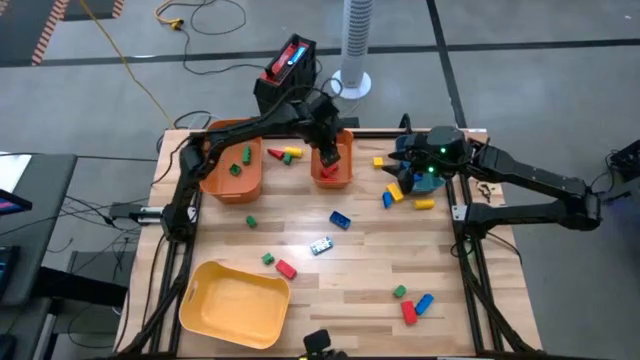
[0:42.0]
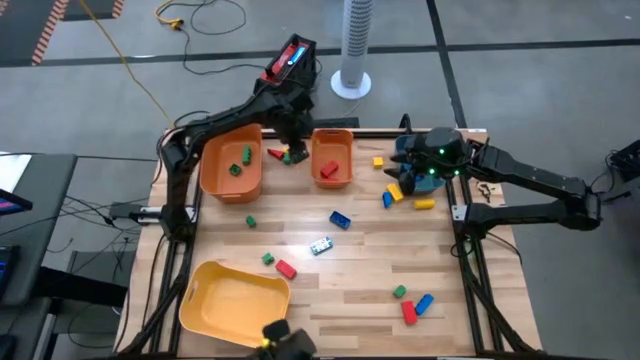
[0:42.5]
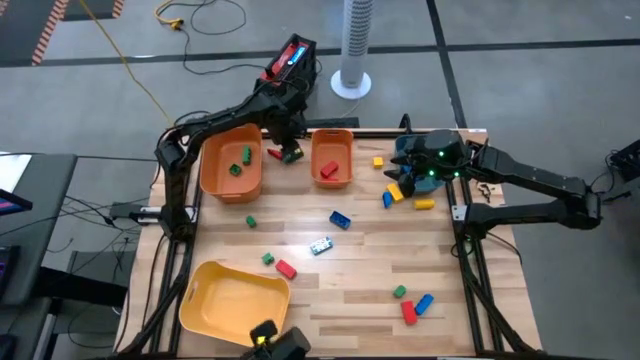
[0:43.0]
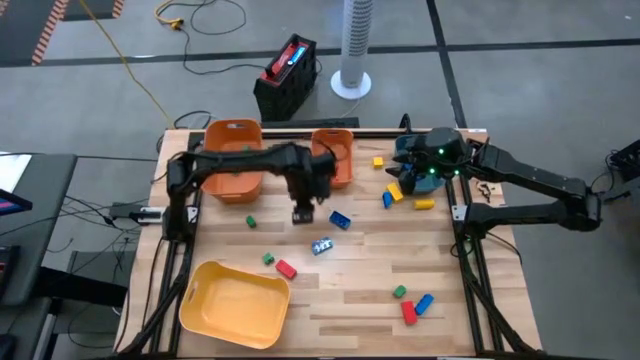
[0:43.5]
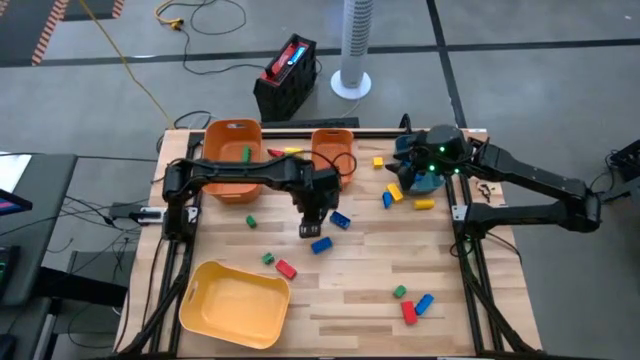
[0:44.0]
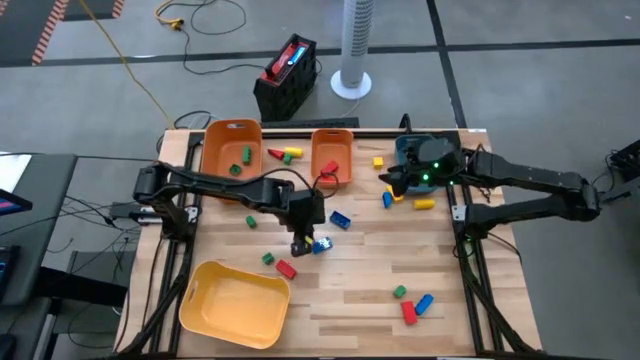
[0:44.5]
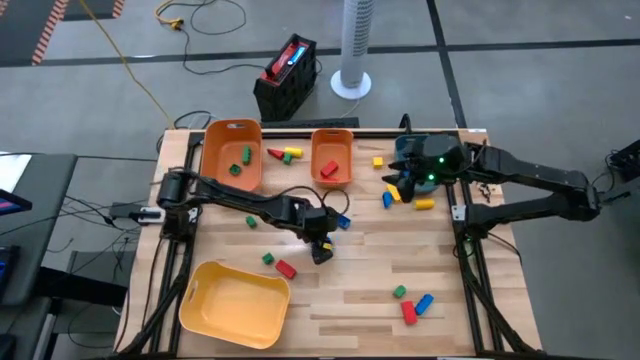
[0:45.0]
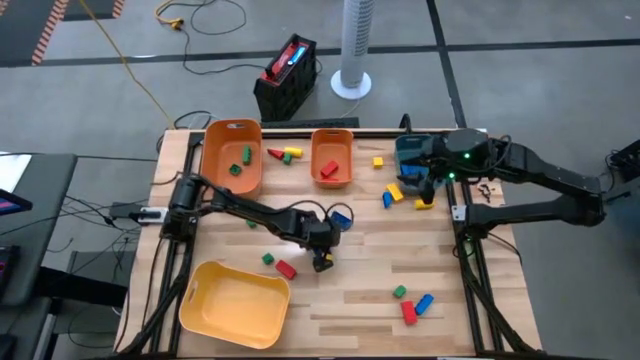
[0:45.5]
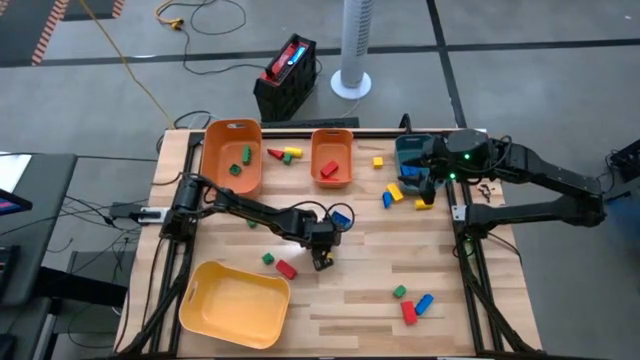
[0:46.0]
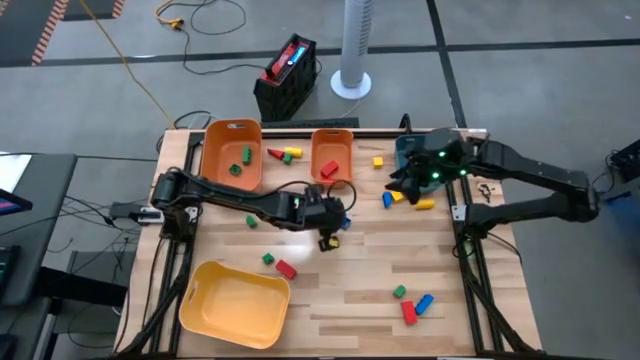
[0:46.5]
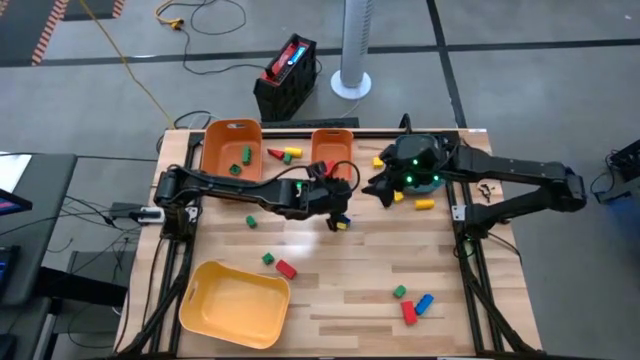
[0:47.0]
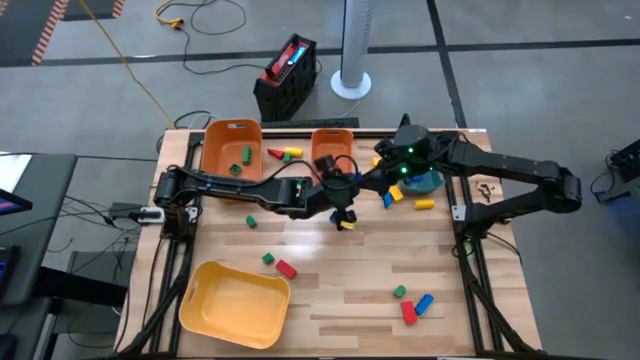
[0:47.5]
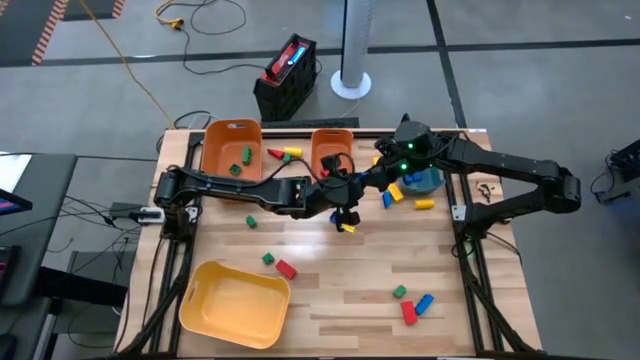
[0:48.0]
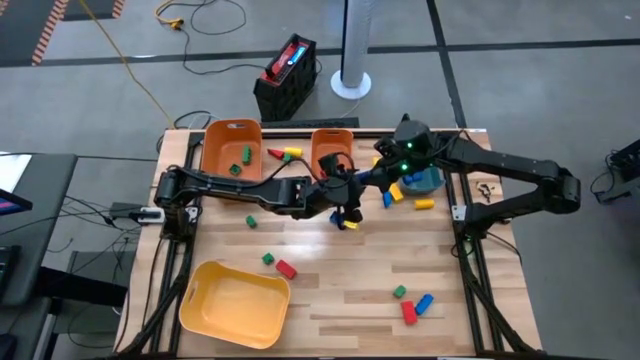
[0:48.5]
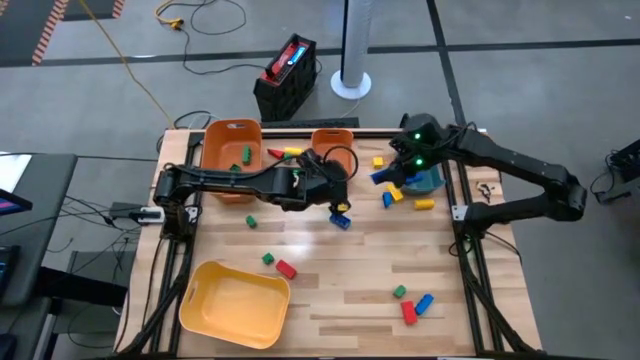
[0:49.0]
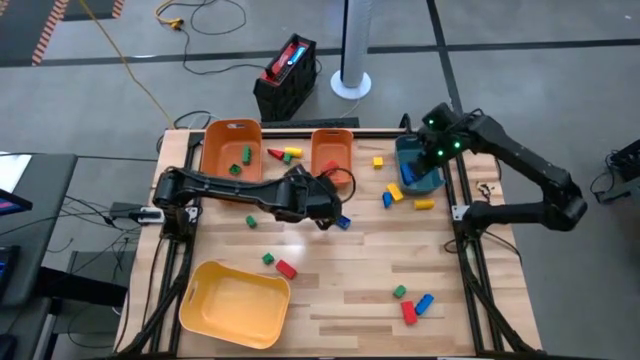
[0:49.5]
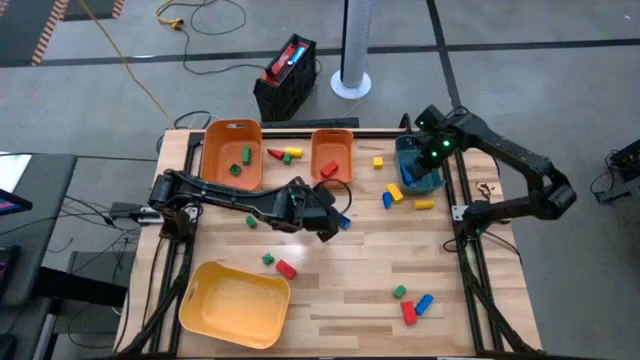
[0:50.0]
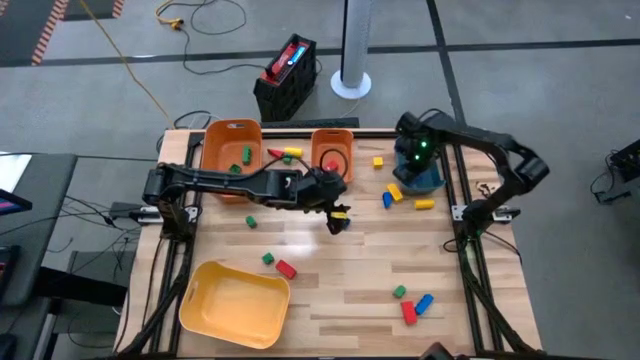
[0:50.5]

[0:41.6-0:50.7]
Task: Sort blocks
Put the blue game piece into the green bin

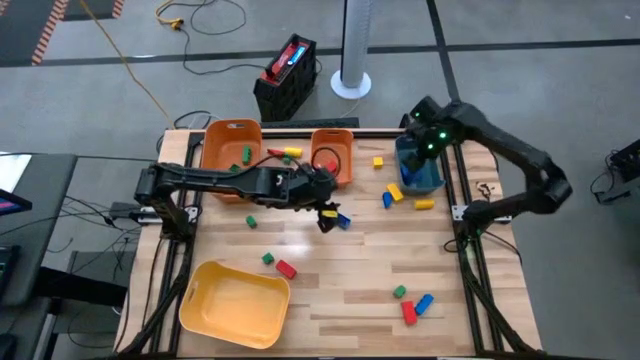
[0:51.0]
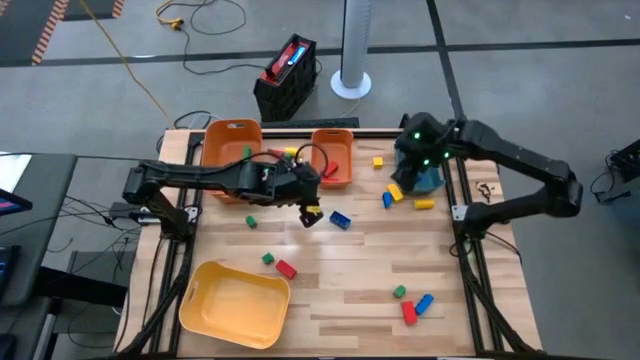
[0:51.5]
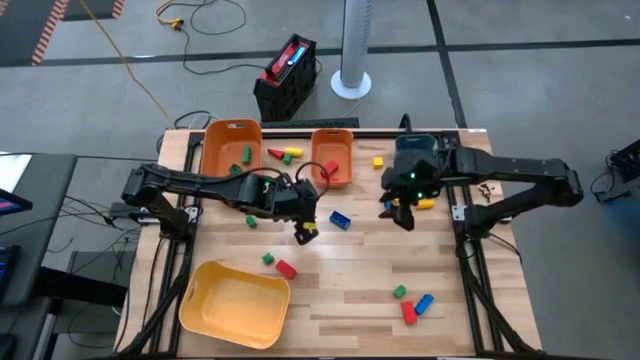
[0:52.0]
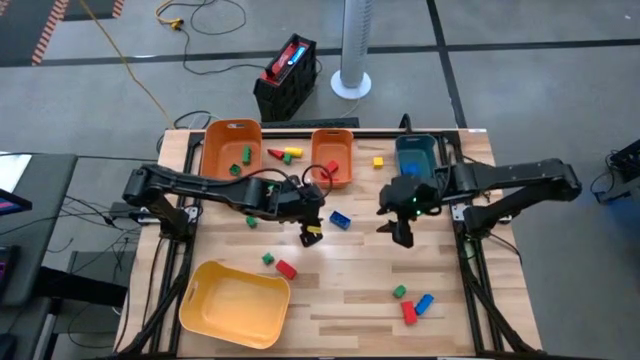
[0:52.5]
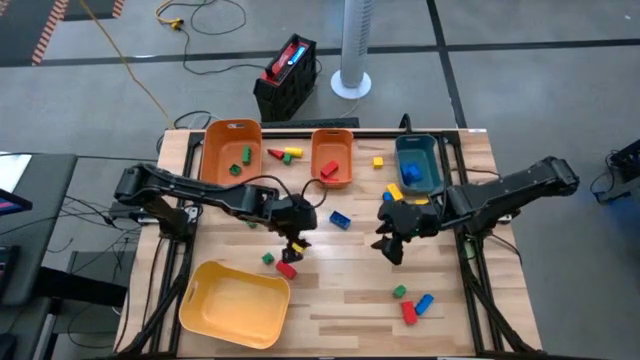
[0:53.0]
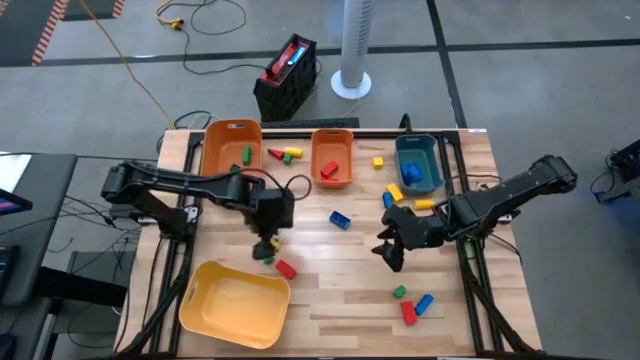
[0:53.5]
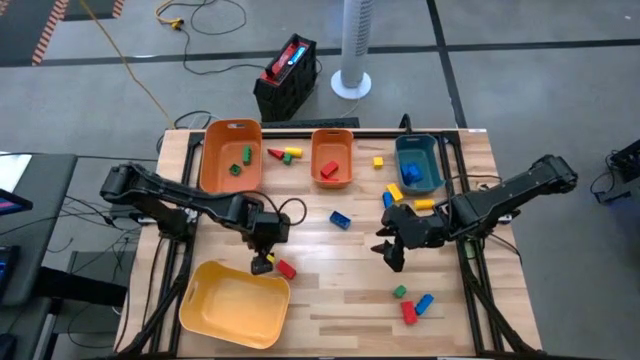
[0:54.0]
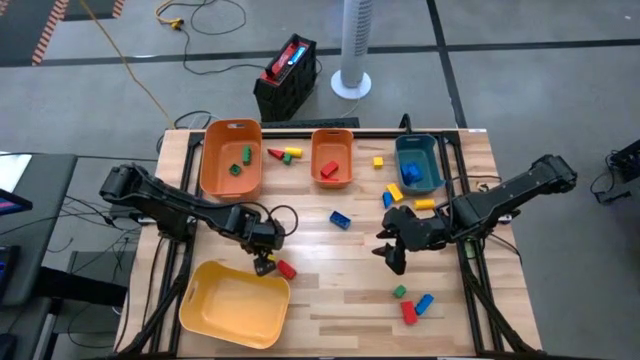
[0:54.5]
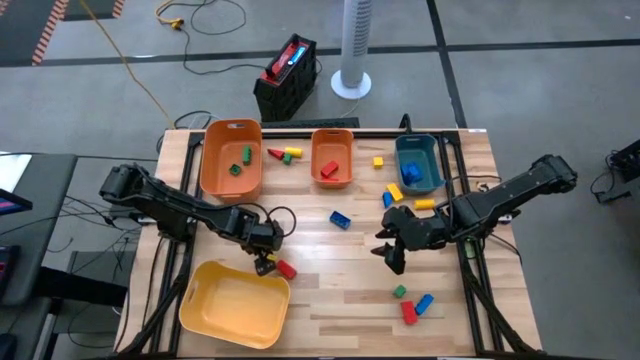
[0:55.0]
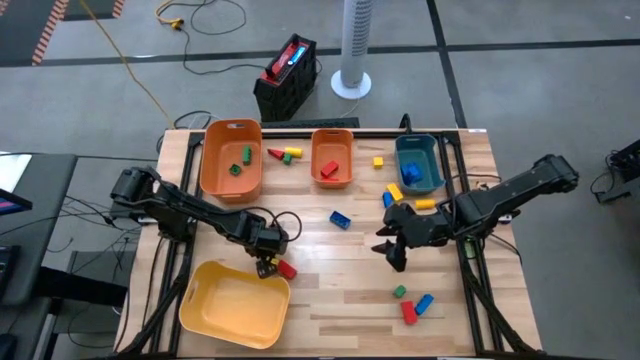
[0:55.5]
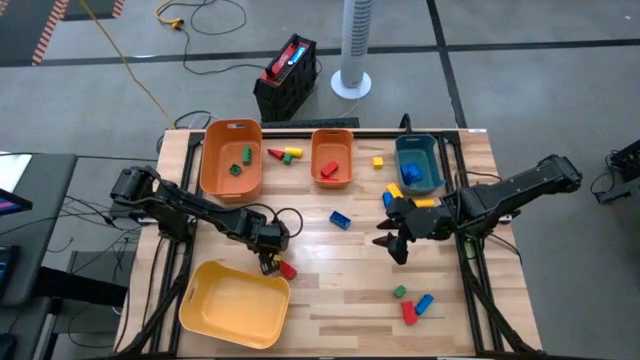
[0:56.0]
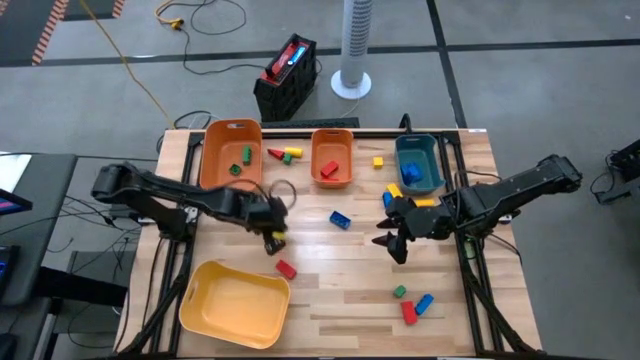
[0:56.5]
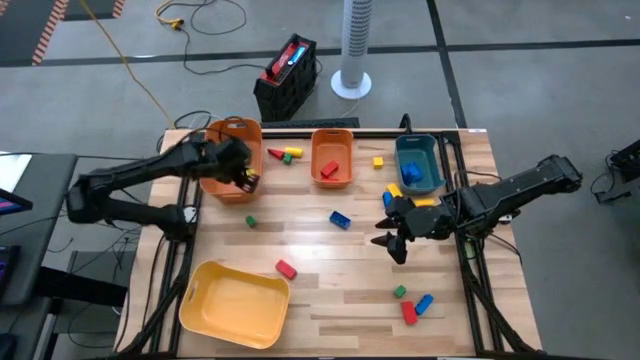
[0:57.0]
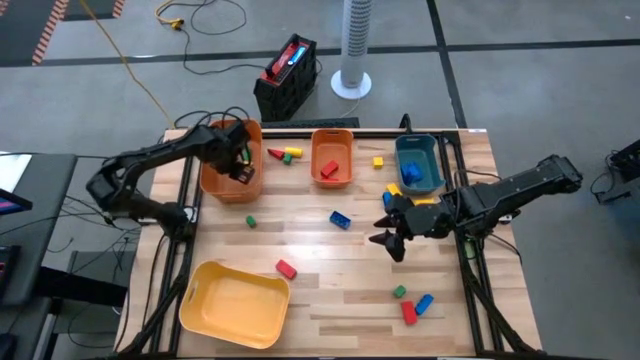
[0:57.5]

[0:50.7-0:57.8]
Put the green game piece into the left orange bin

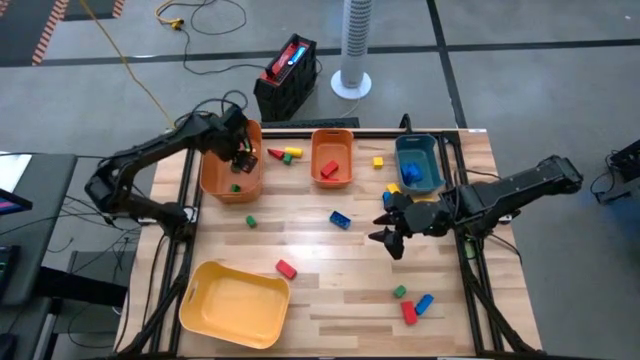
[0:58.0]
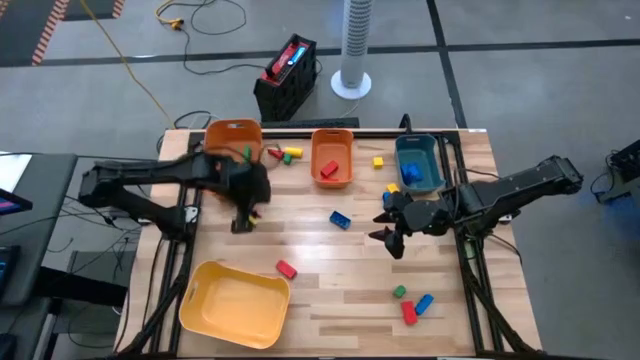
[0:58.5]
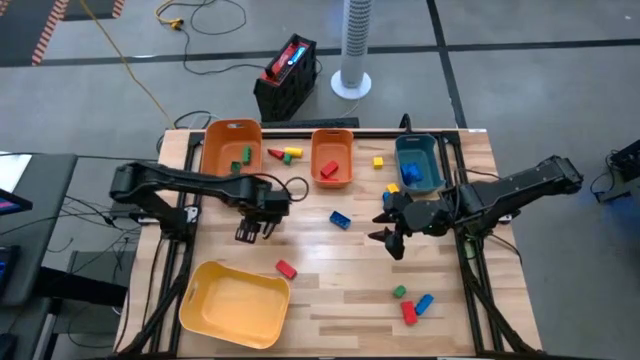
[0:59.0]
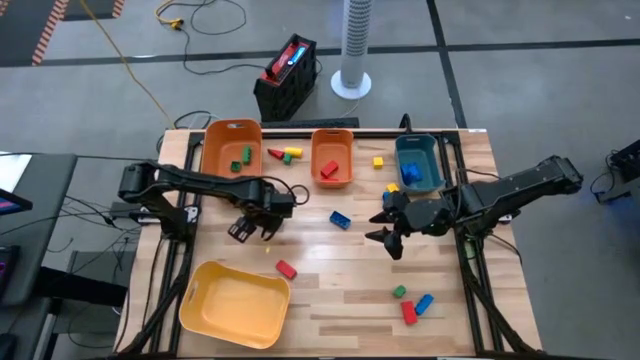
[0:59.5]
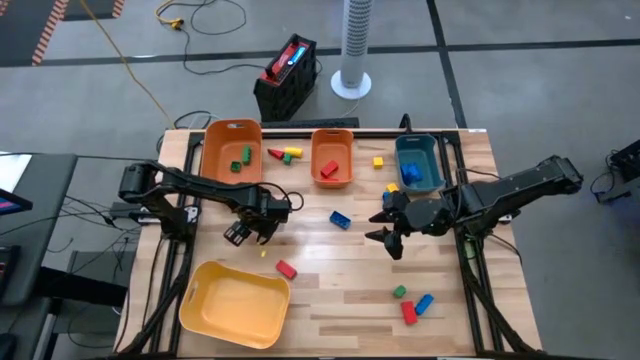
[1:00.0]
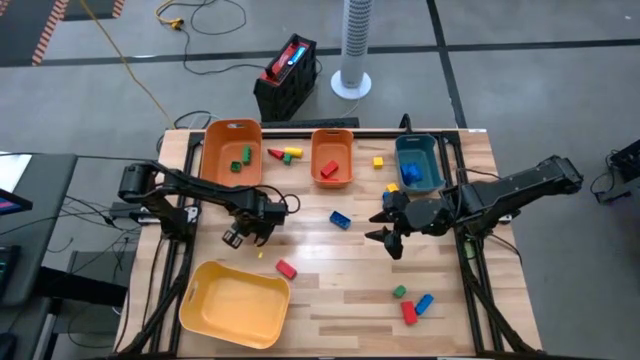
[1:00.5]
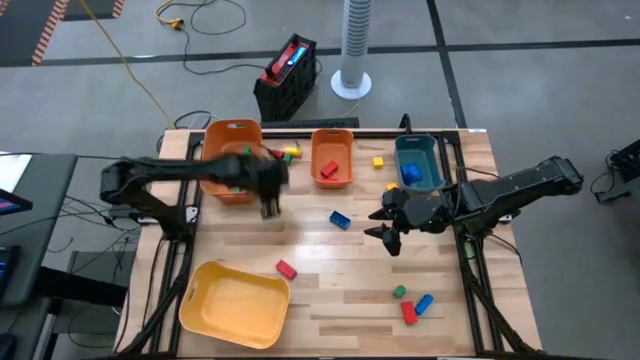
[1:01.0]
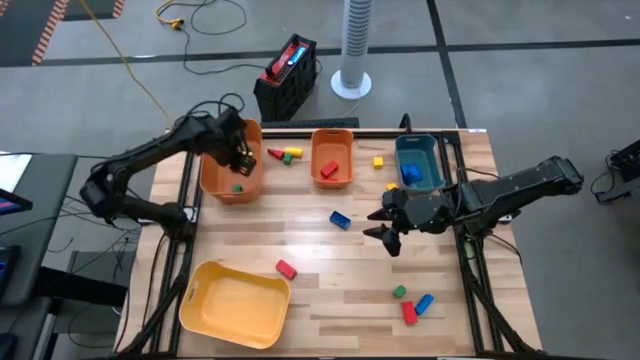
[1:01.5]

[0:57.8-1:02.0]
Put the green game piece into the left orange bin
